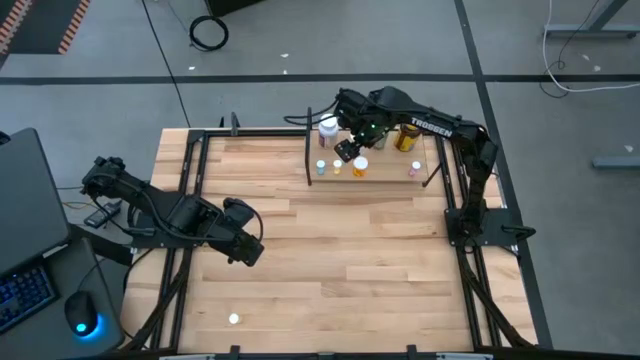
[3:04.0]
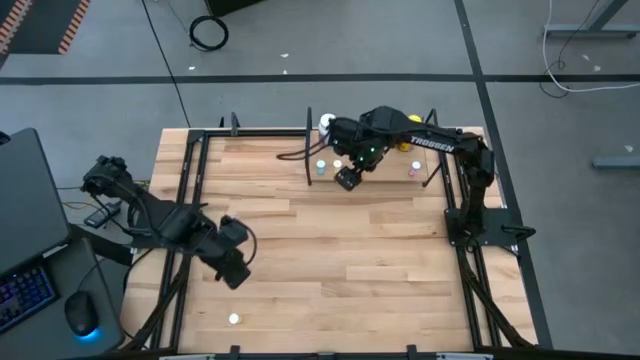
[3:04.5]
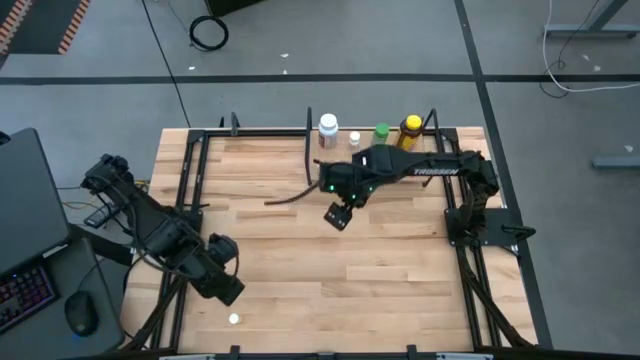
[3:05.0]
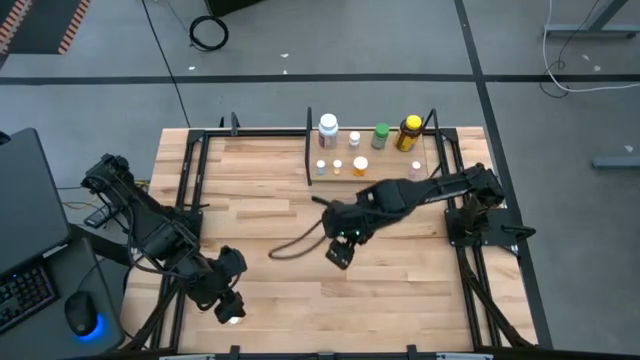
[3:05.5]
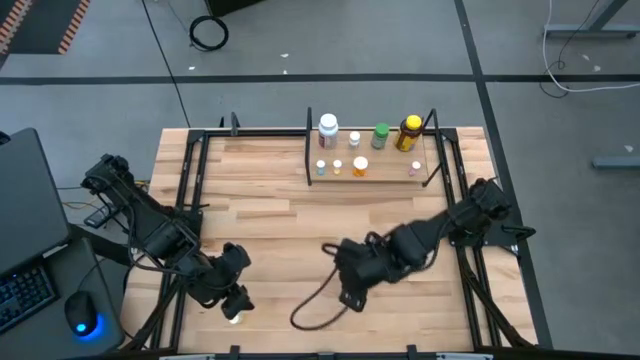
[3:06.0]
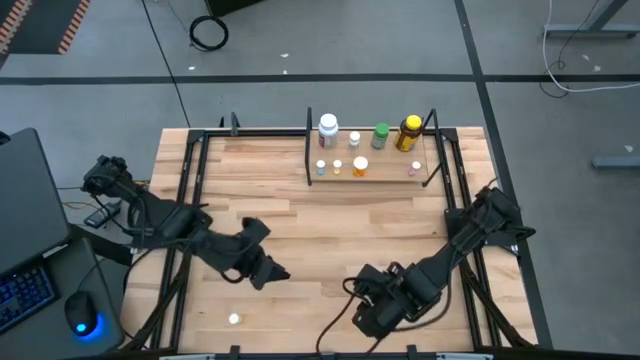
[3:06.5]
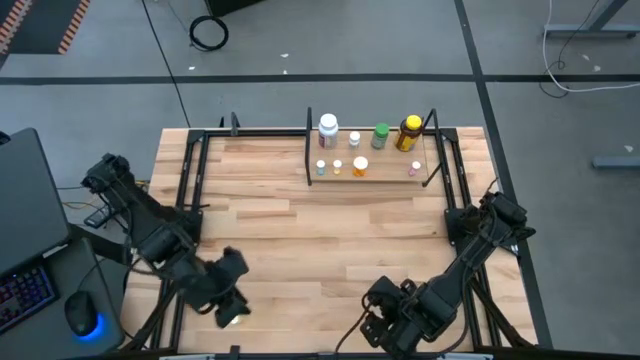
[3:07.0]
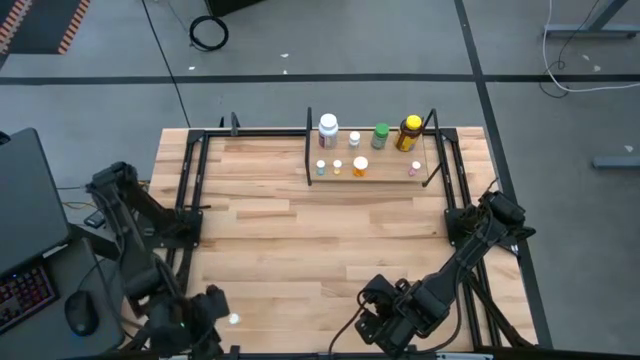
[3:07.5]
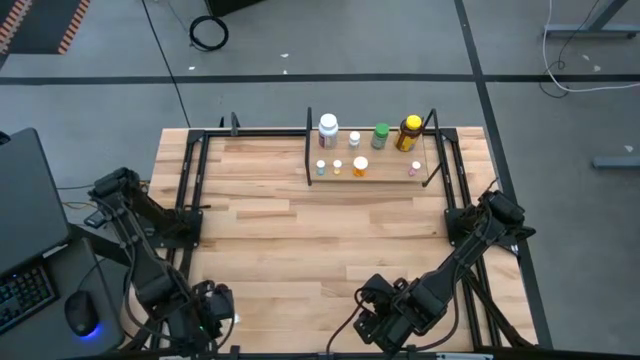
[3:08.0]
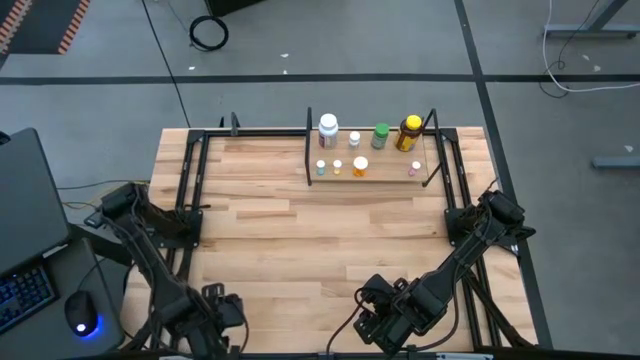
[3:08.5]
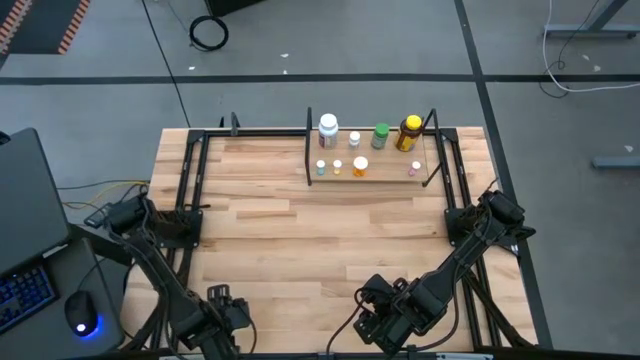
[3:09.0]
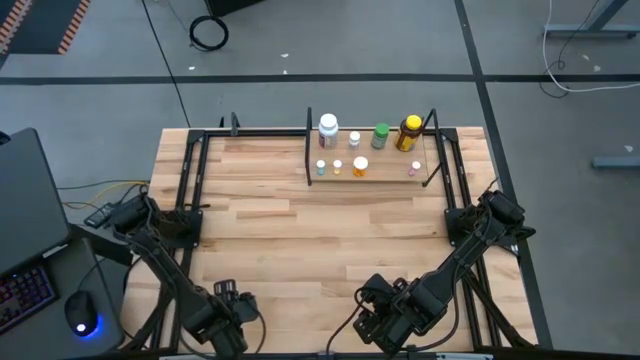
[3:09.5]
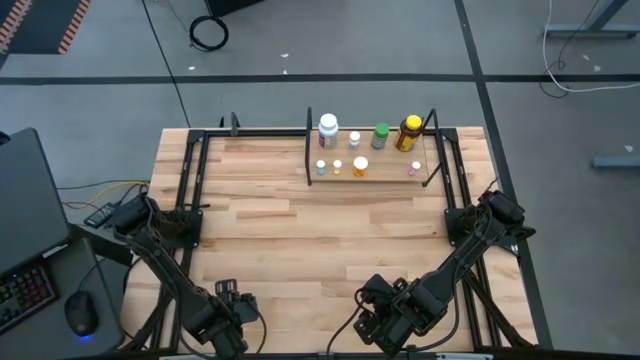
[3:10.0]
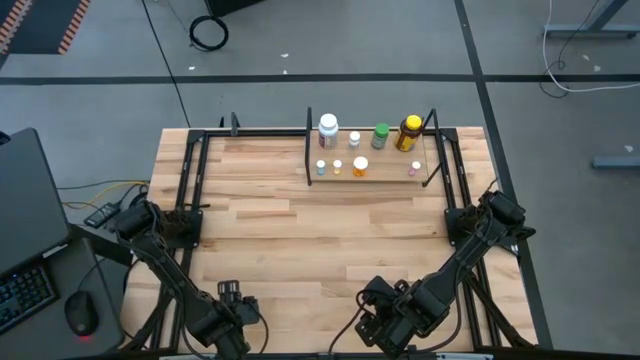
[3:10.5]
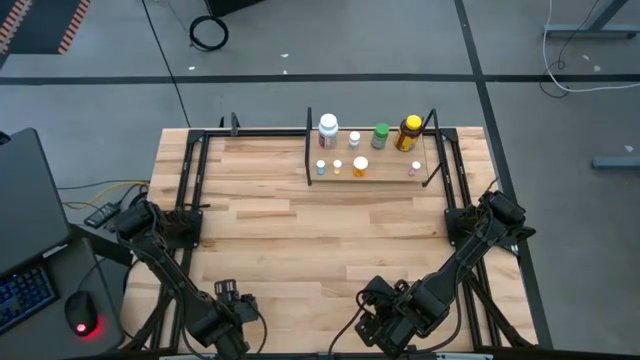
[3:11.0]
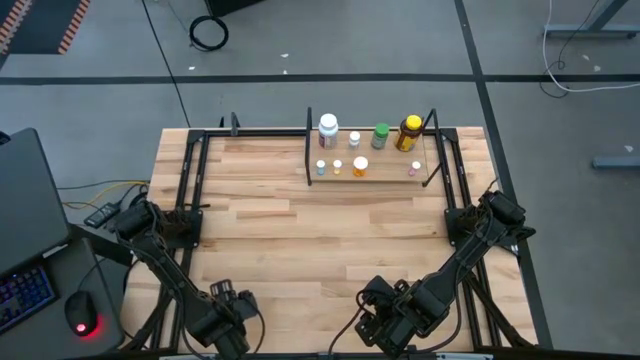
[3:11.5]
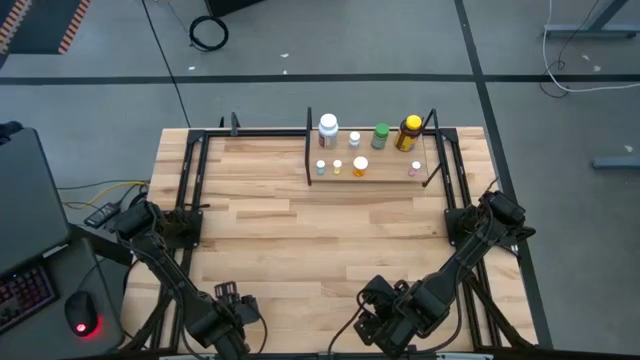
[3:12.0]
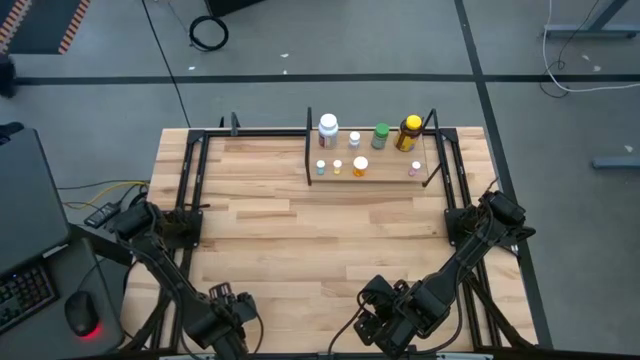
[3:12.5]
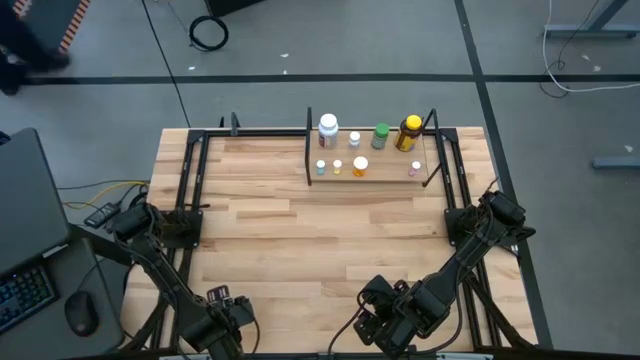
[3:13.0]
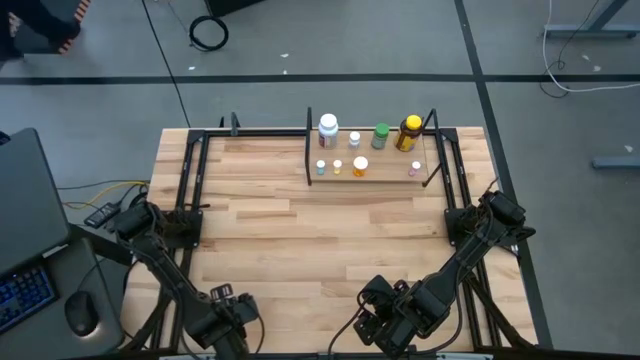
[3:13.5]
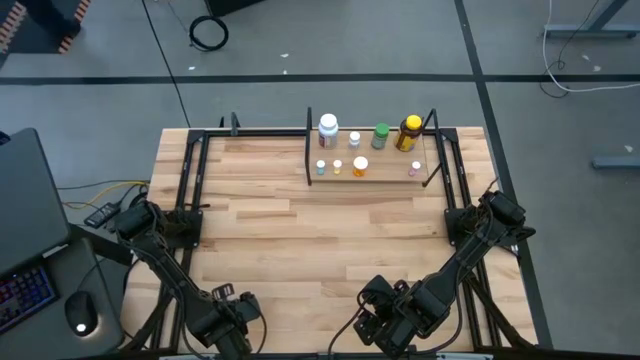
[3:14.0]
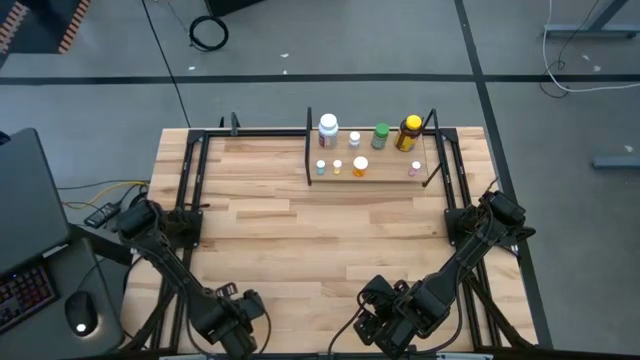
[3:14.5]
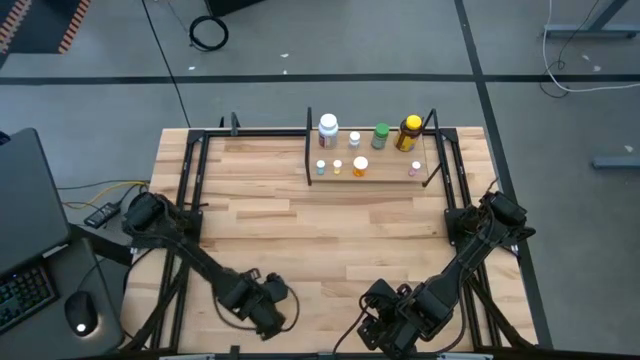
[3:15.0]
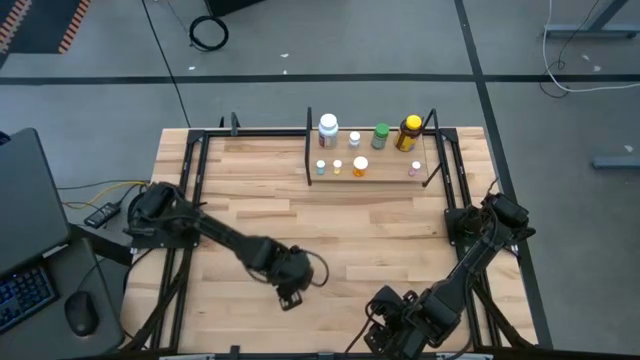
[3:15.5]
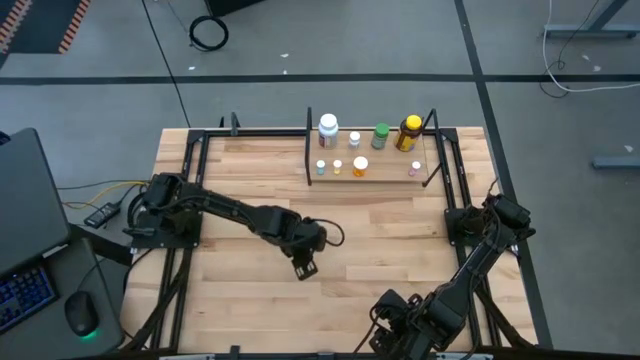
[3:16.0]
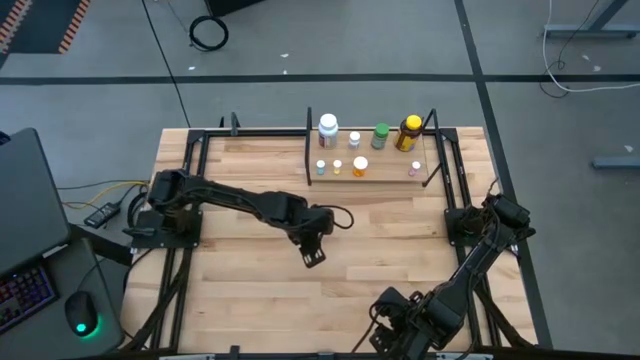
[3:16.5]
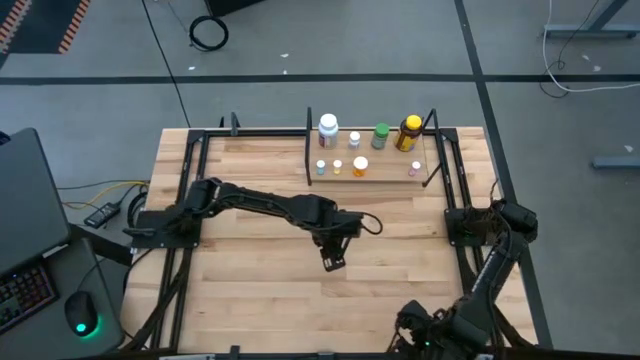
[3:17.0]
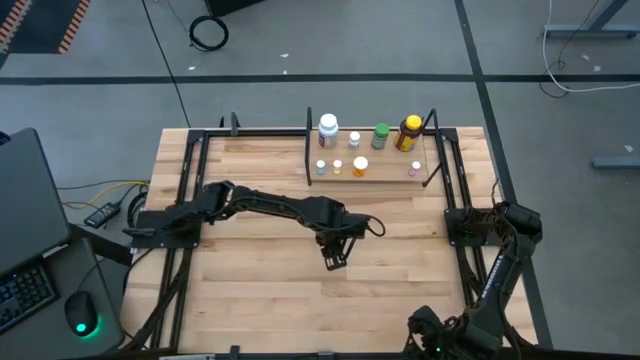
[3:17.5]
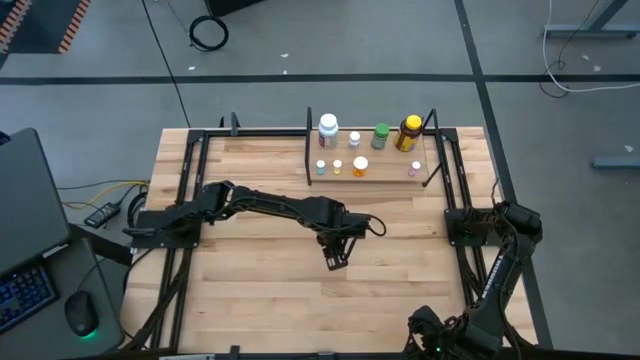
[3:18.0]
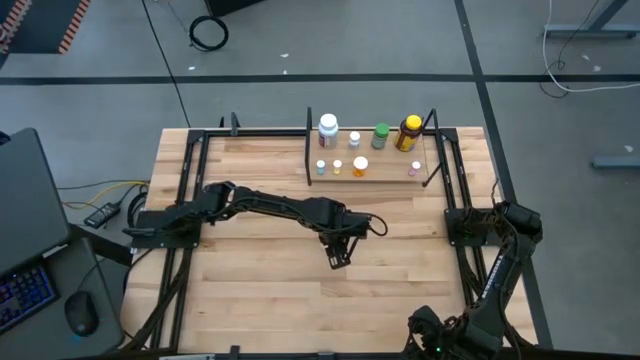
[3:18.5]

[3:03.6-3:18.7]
Task: Pick and place medicine bottles onto shelf by color
Put the small yellow pill bottle on the shelf

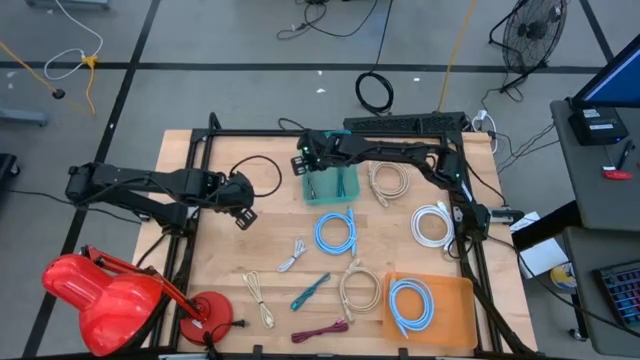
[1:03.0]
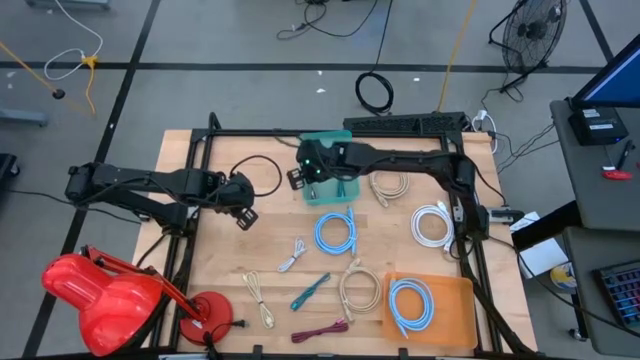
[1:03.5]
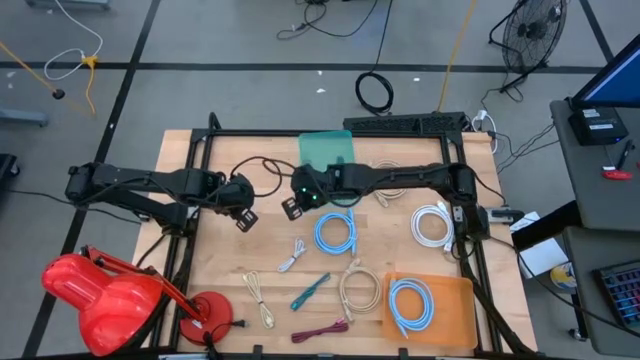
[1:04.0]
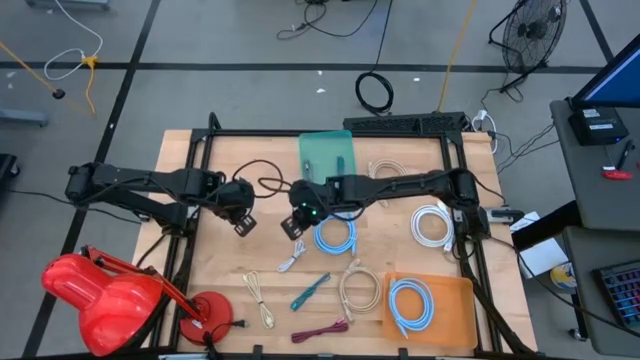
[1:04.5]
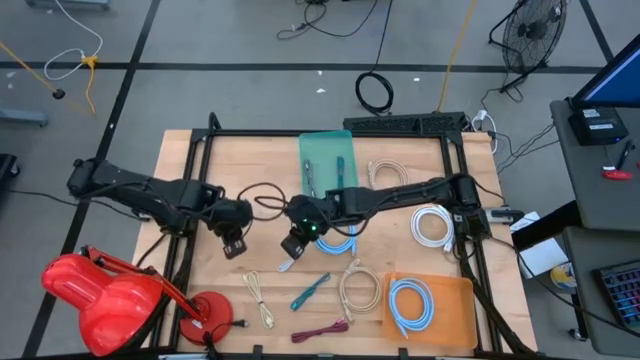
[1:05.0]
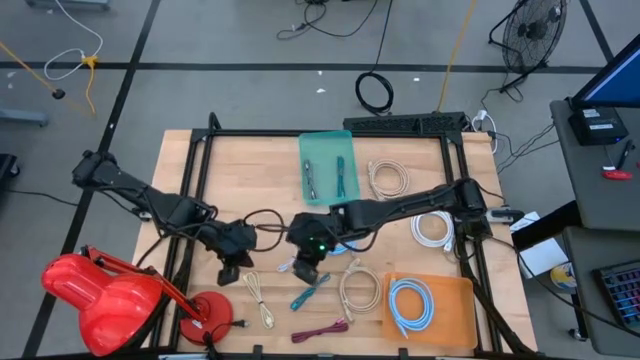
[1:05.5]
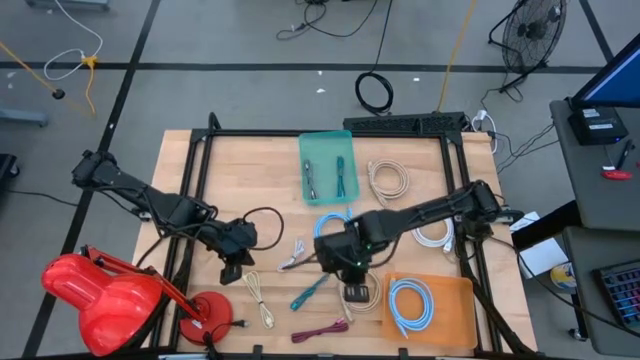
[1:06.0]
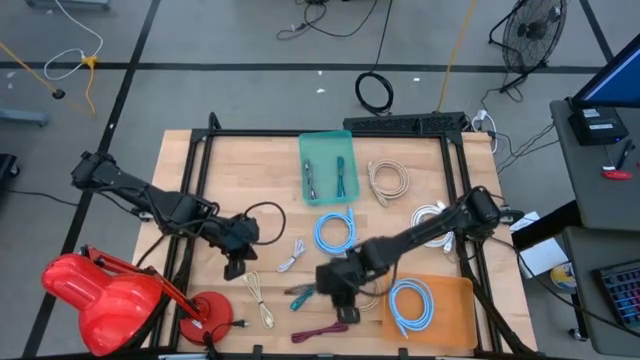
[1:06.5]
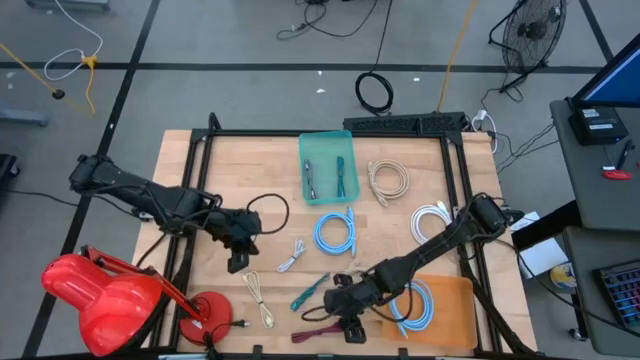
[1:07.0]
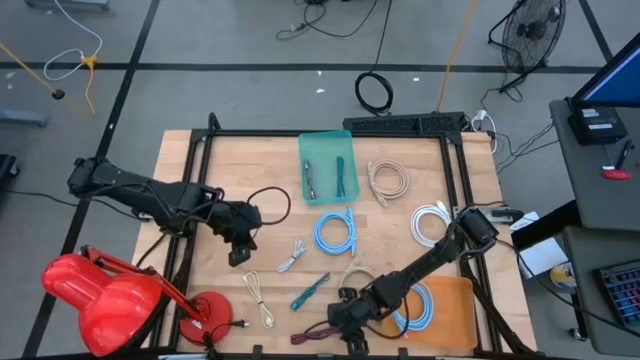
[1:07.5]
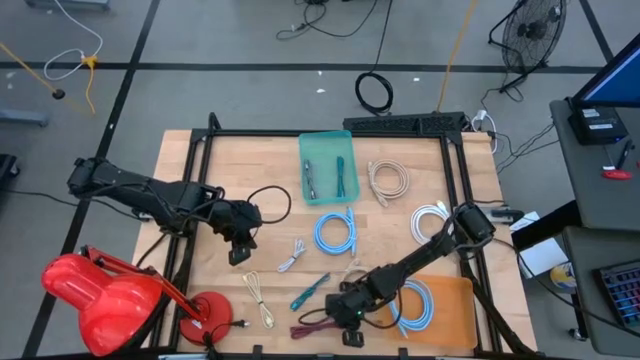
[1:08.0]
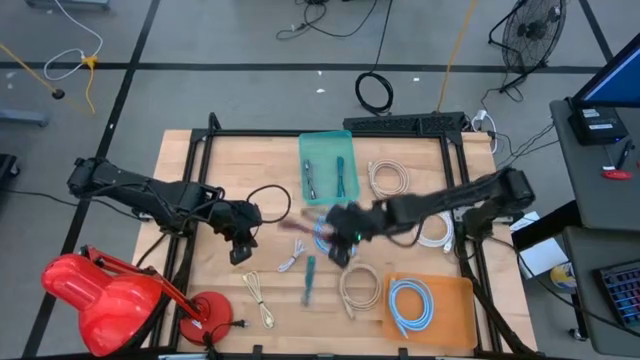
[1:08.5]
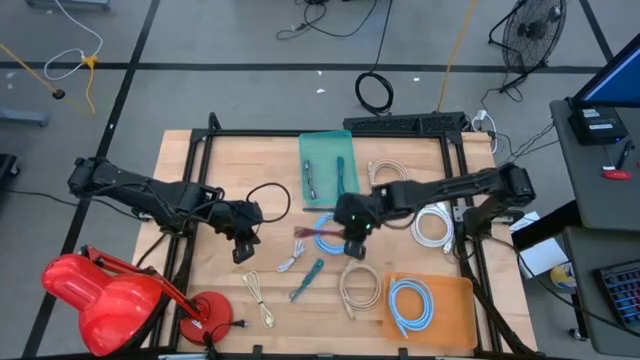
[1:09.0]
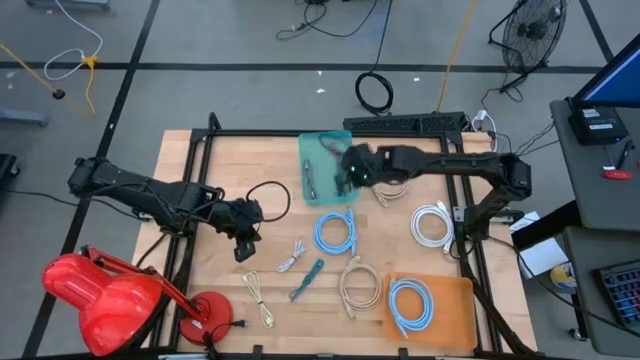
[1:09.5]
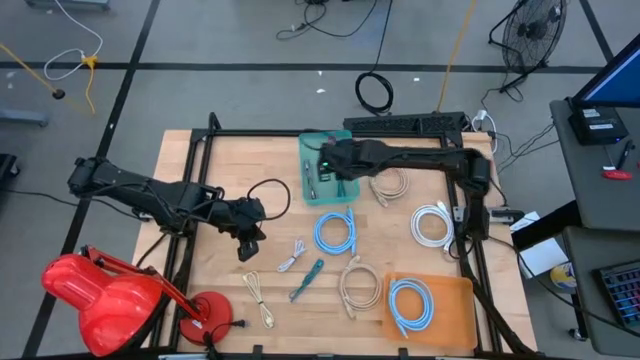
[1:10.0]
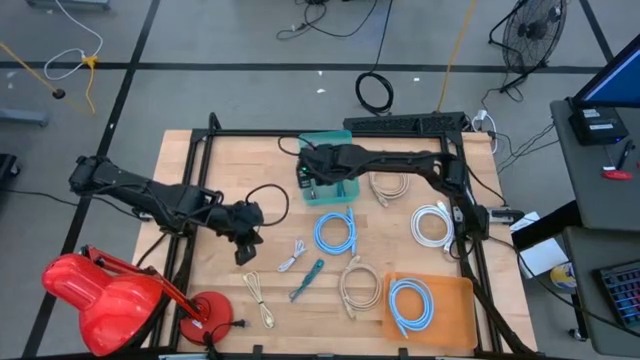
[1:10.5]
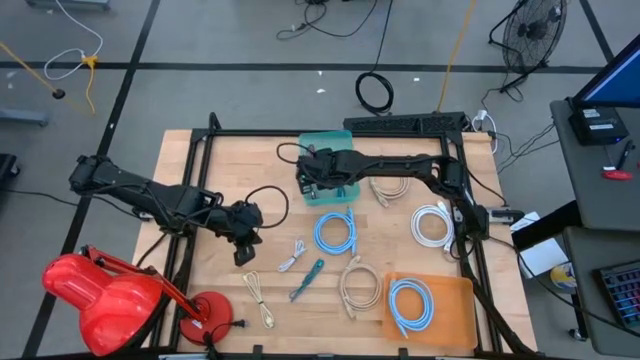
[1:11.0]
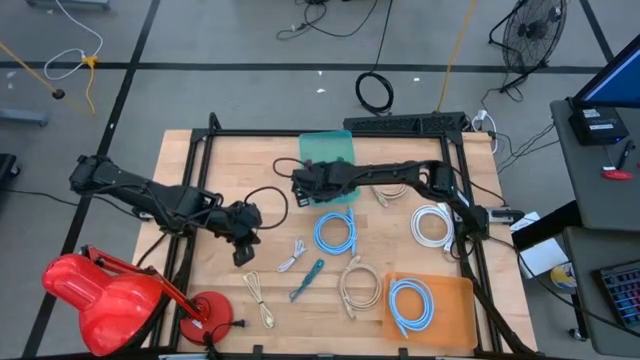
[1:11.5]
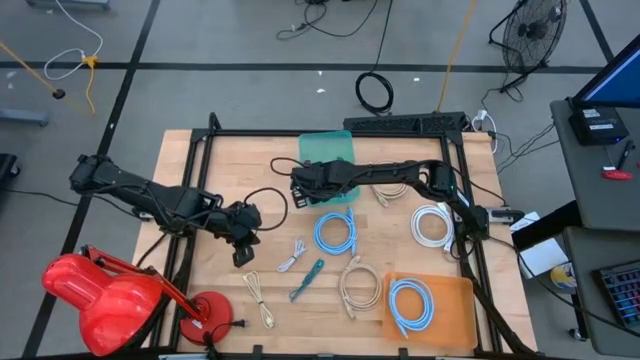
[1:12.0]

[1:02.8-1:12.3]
Task: Pick & Place USB Port
Put the pink charger cable into the blue bin
